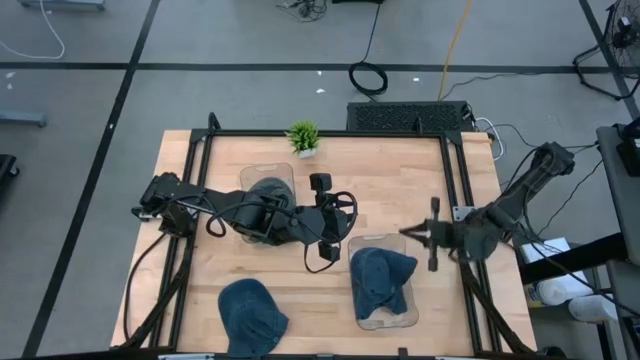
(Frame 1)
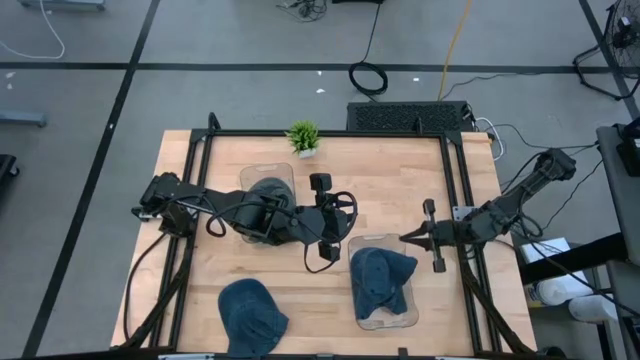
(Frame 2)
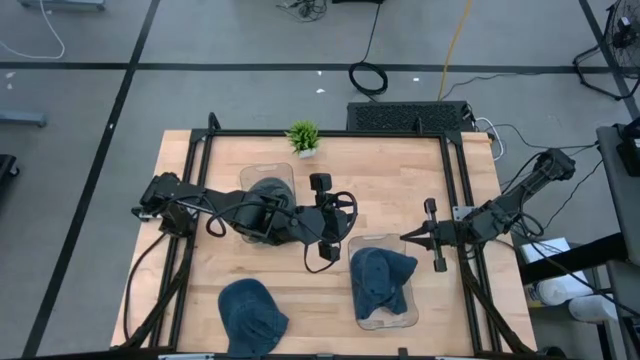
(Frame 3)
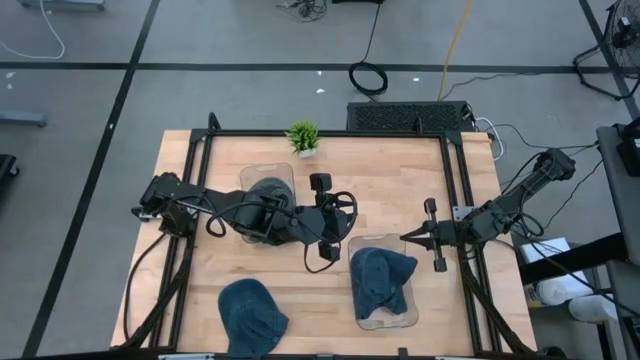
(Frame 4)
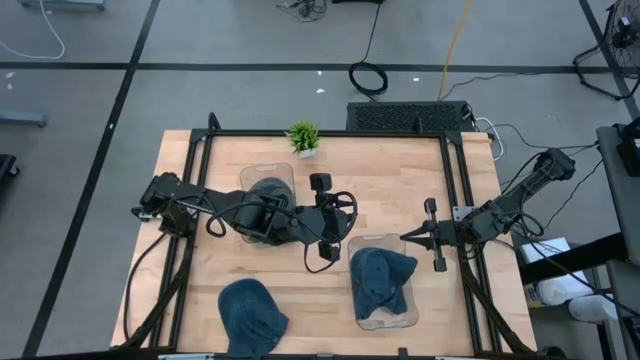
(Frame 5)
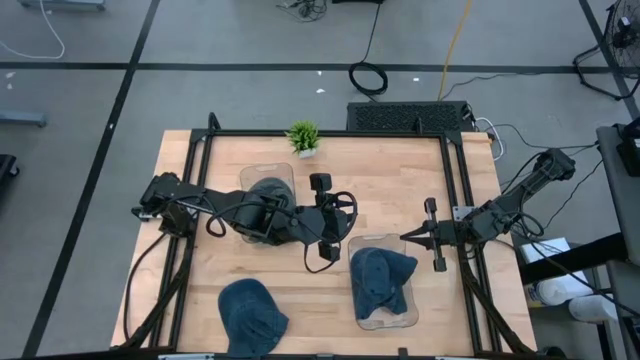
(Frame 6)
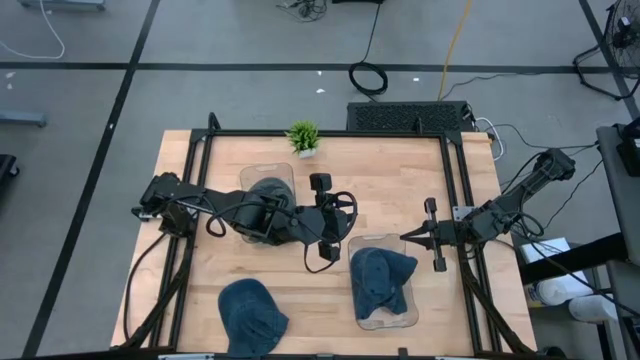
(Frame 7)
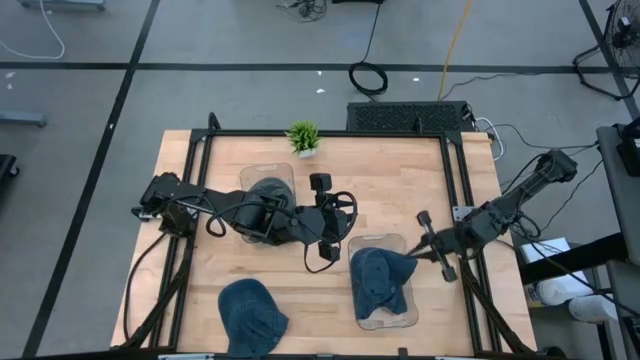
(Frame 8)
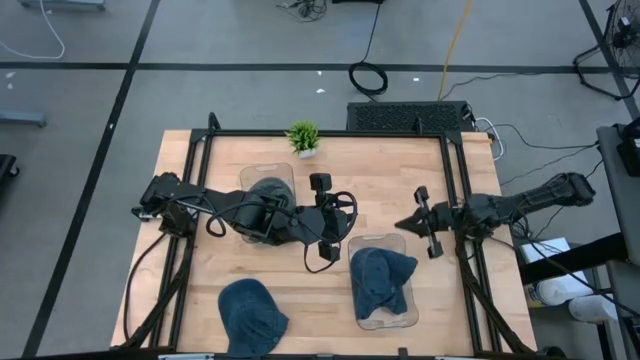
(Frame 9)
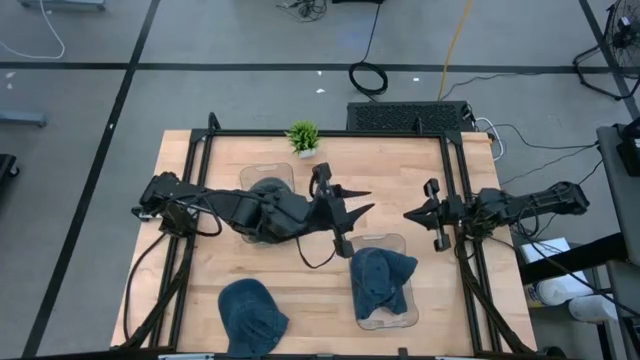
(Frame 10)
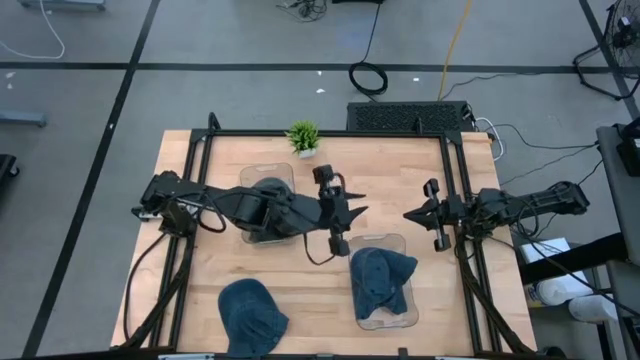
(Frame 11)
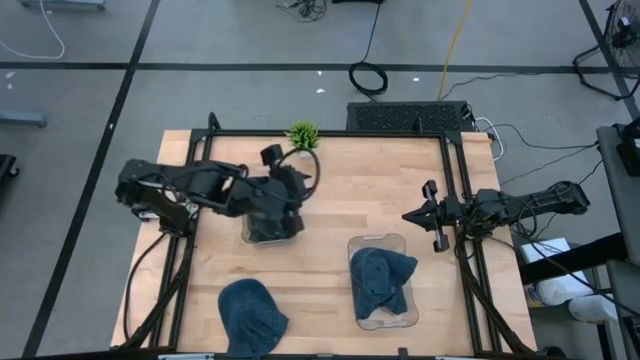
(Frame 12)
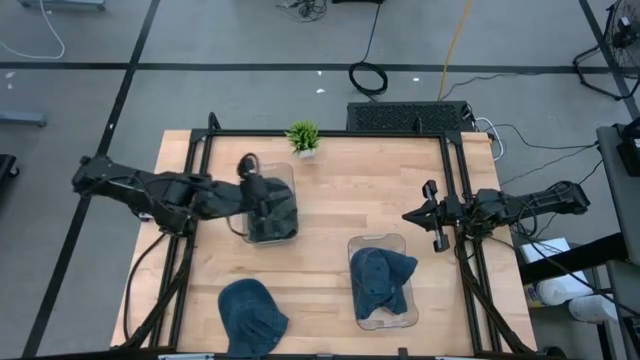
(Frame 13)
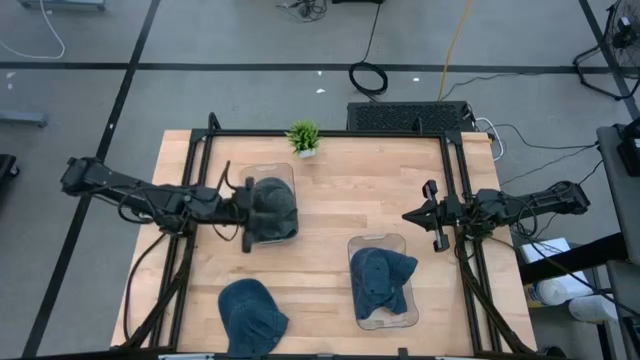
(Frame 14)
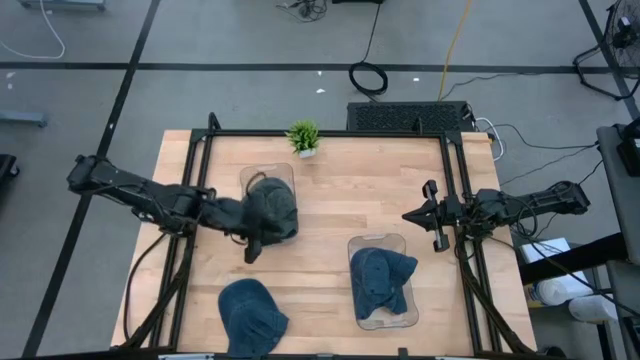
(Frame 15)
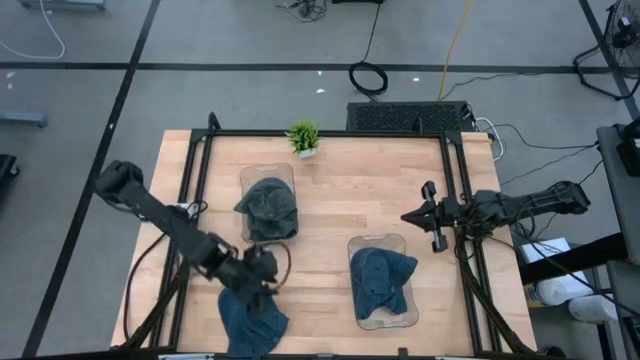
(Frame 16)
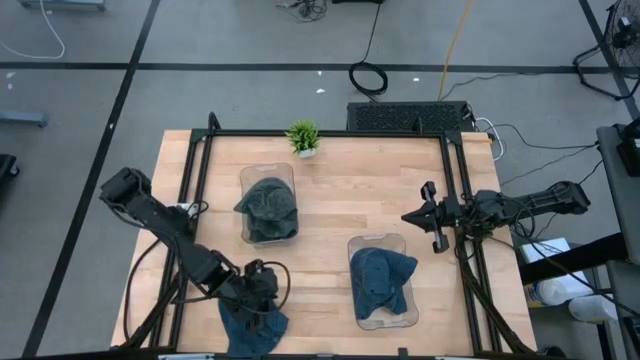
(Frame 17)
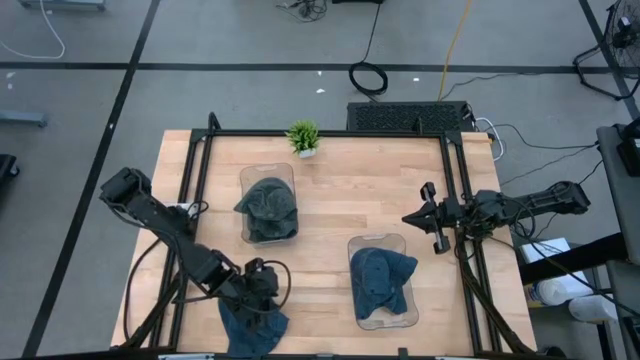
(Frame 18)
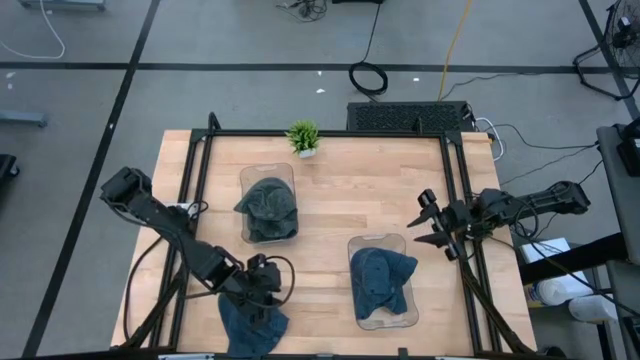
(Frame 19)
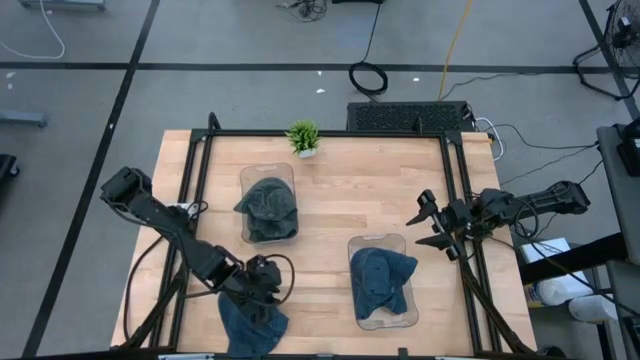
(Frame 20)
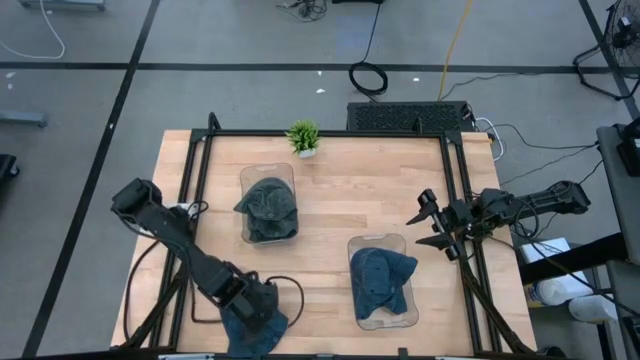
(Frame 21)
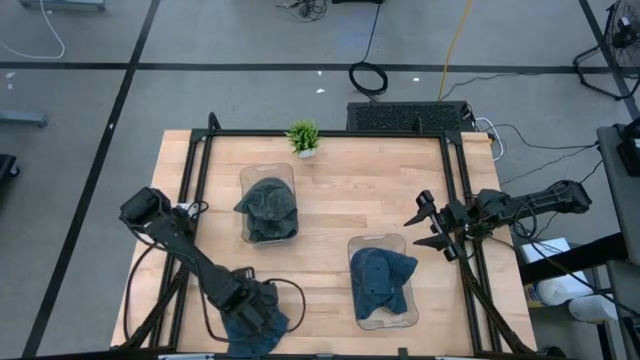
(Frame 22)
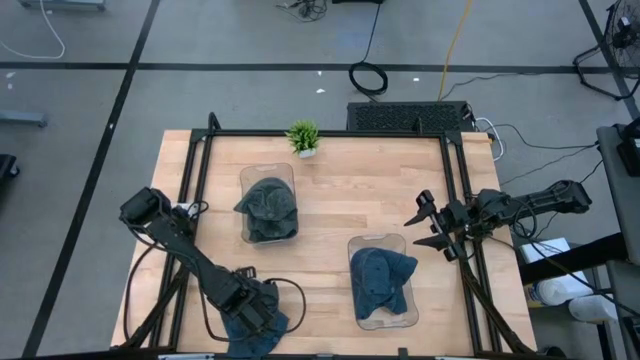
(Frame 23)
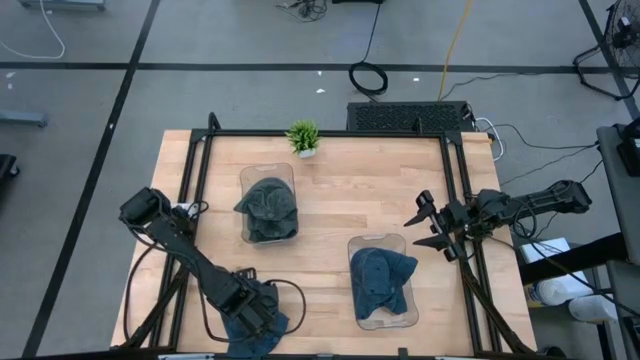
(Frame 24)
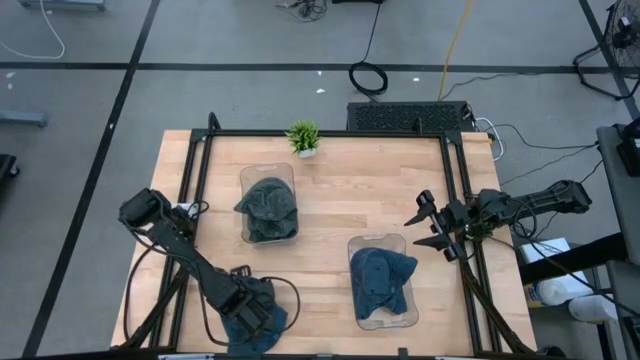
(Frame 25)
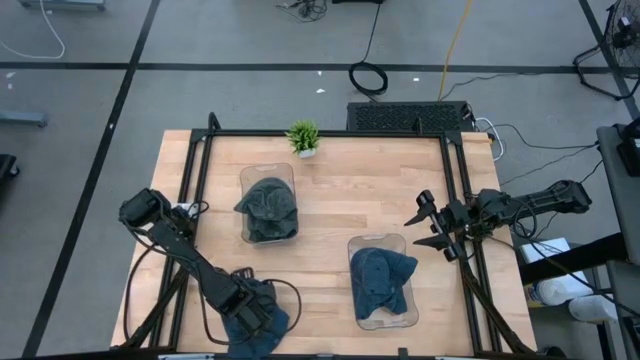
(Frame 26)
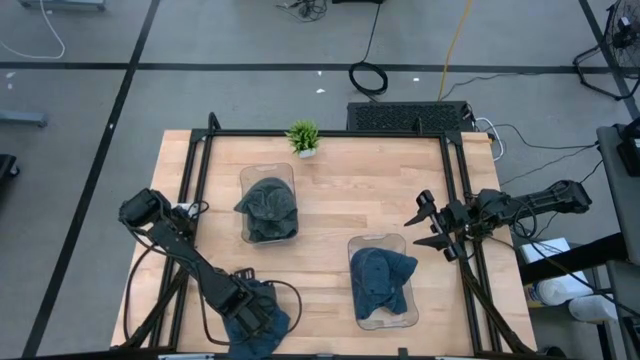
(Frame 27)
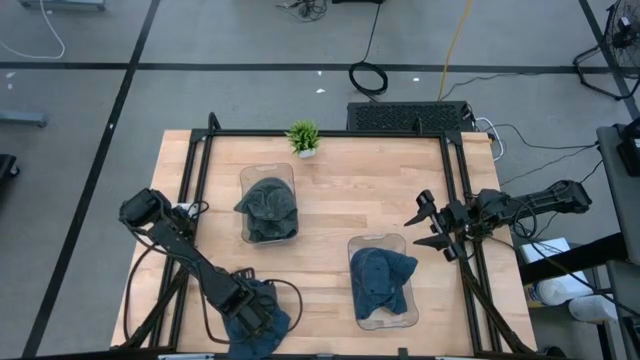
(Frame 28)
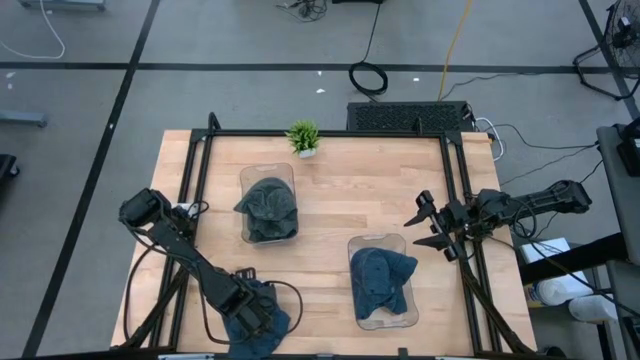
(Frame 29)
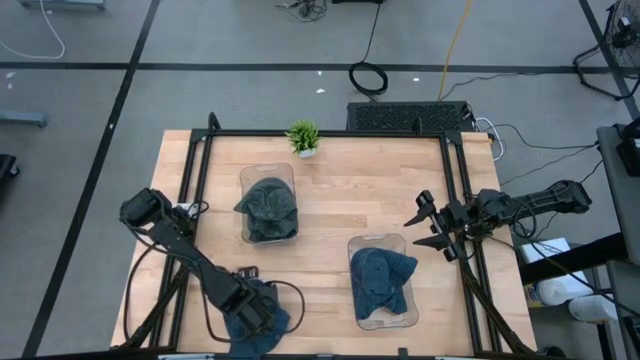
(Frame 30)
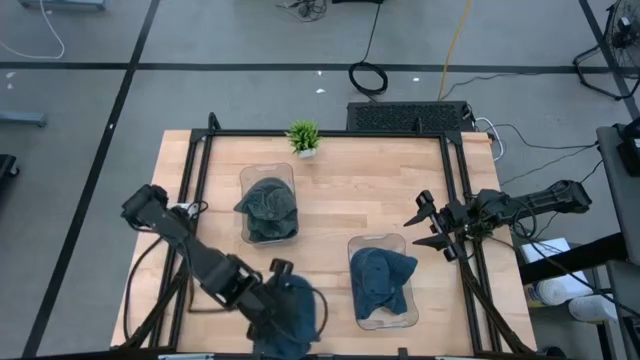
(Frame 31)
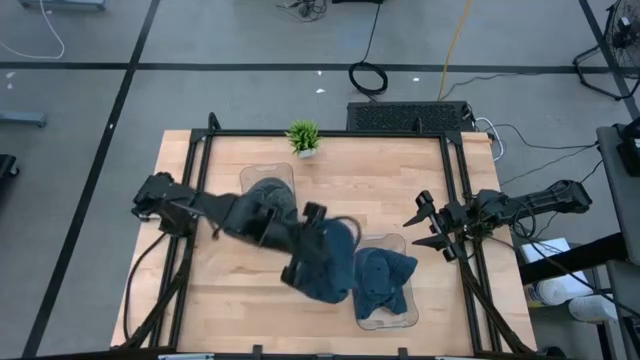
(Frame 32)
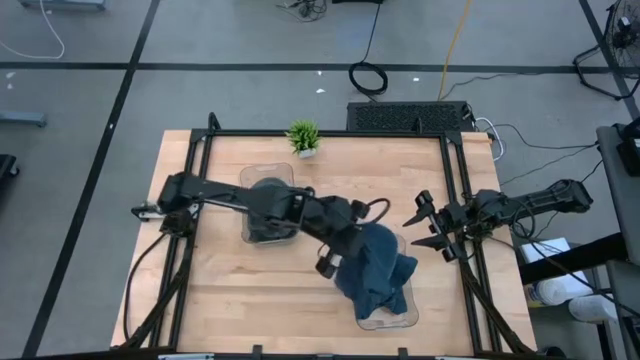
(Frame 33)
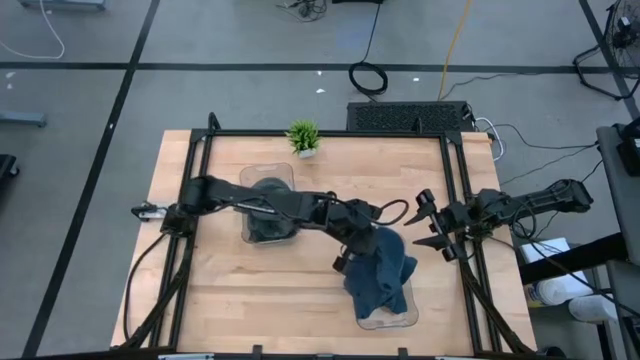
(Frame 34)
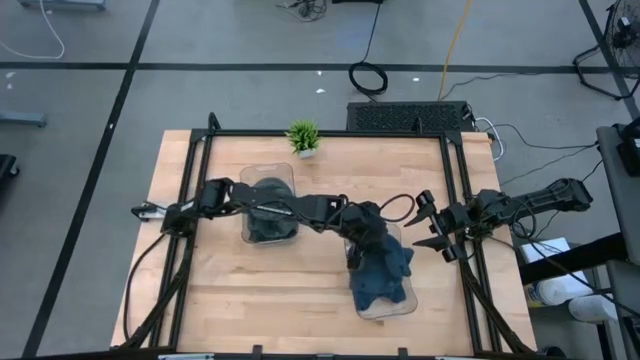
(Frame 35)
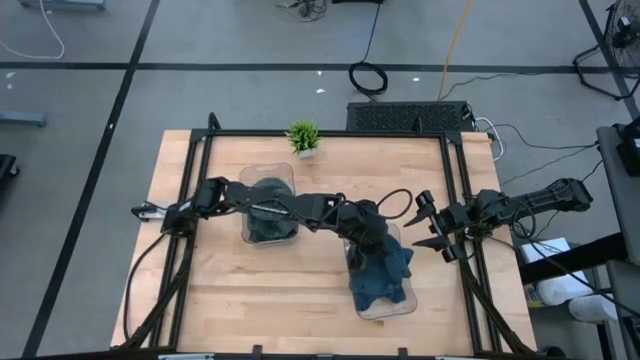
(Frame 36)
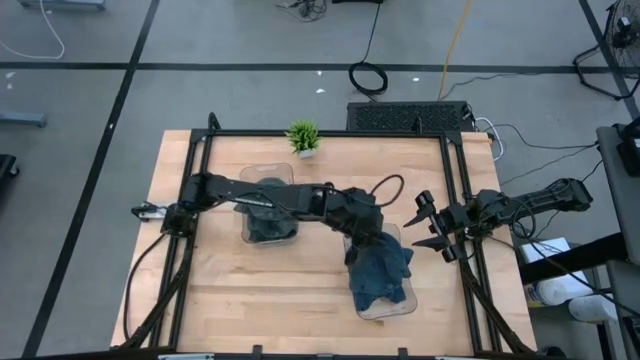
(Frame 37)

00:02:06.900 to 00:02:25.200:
Task: Pick & Place hat
Put the blue cap into the bottom transparent bin

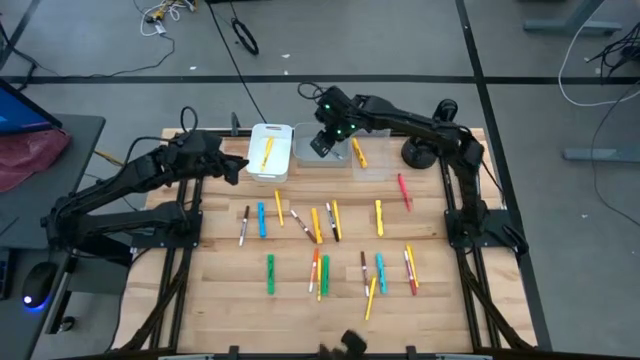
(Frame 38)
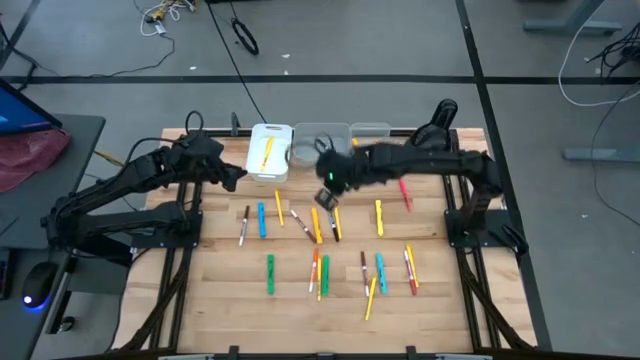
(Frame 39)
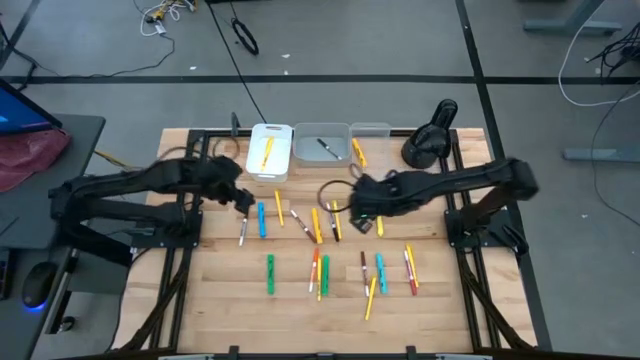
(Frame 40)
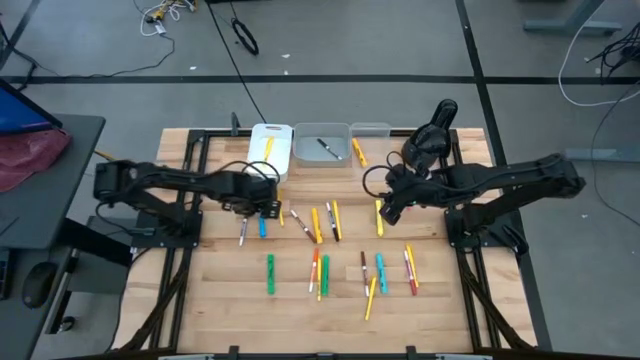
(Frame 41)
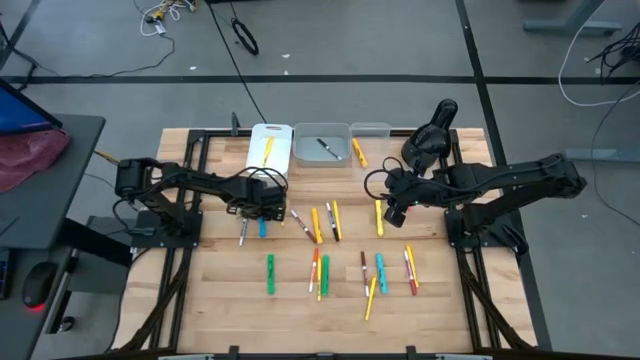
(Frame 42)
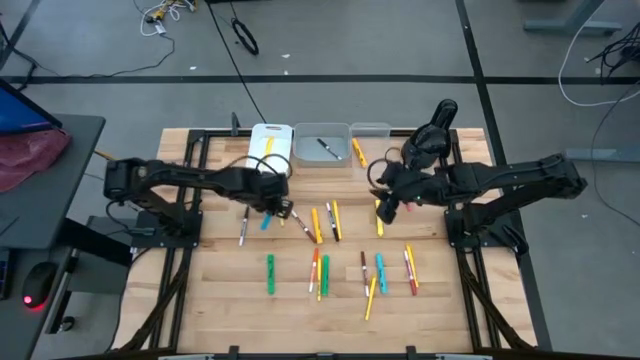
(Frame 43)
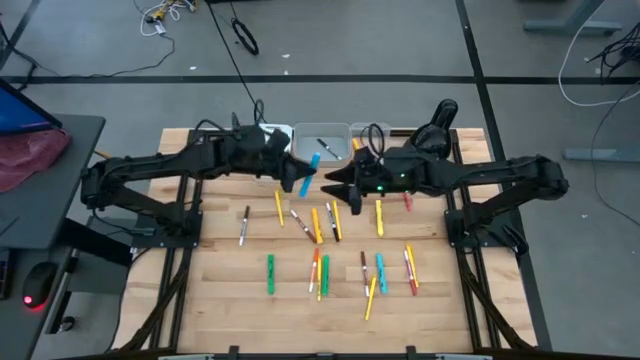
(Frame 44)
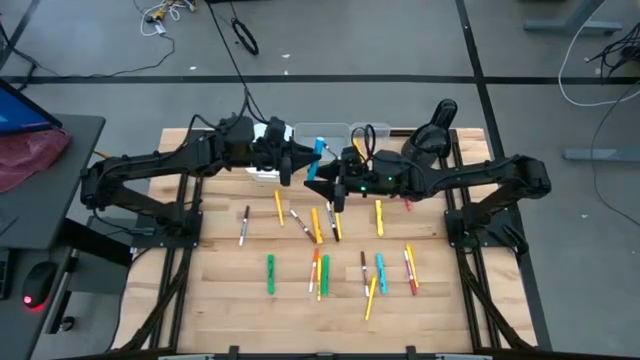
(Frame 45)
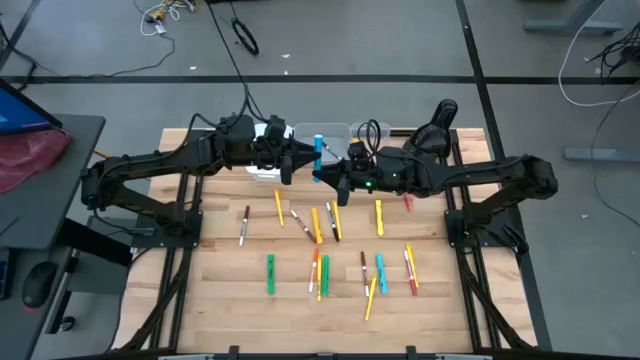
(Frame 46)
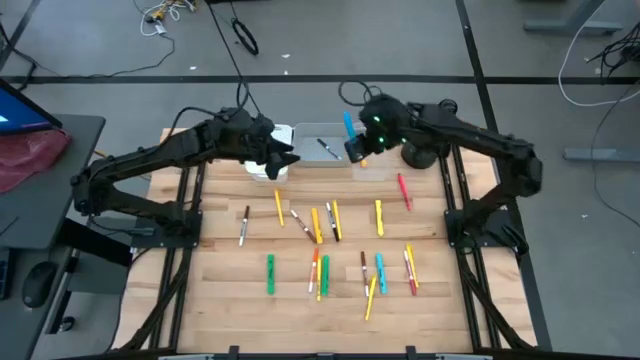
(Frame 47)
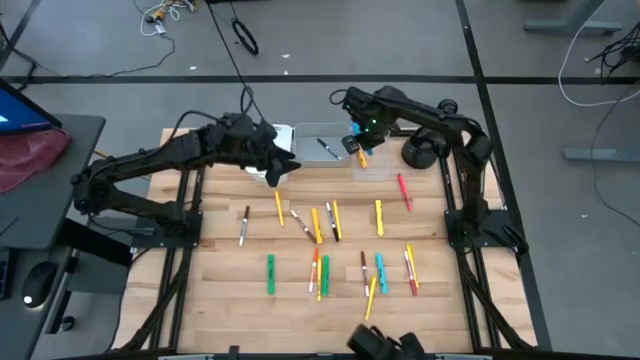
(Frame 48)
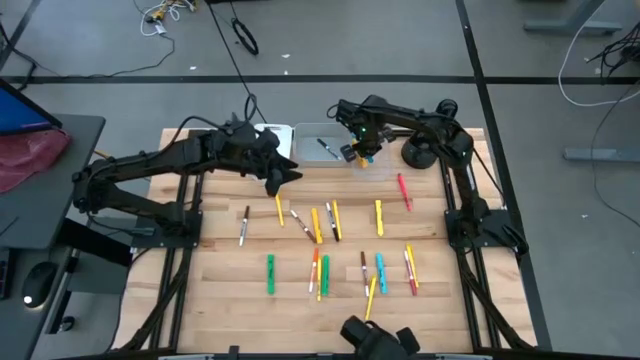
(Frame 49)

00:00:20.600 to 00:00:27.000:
Task: Pick & Place Markers
Put the blue highlighter pen into the transparent bin
